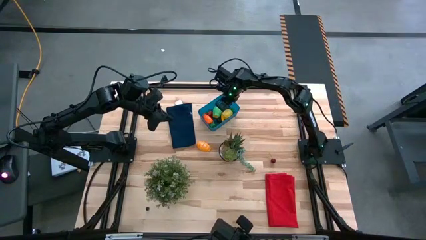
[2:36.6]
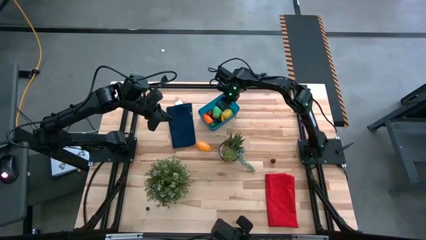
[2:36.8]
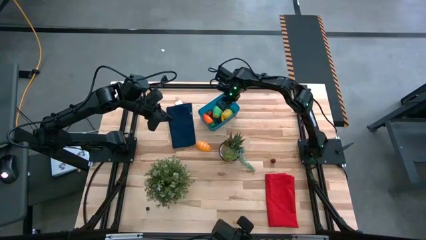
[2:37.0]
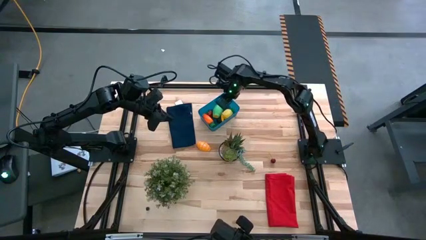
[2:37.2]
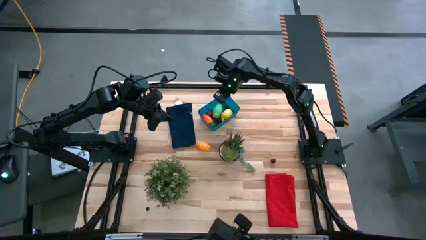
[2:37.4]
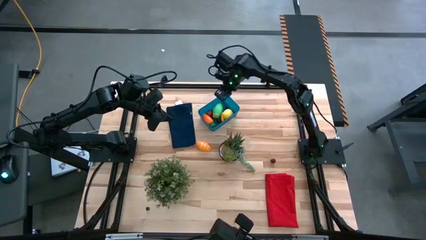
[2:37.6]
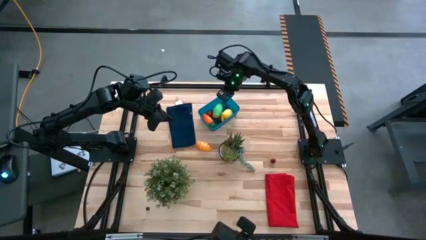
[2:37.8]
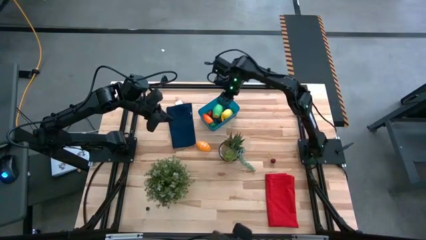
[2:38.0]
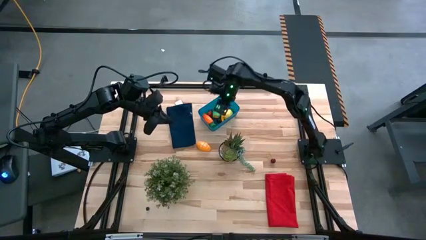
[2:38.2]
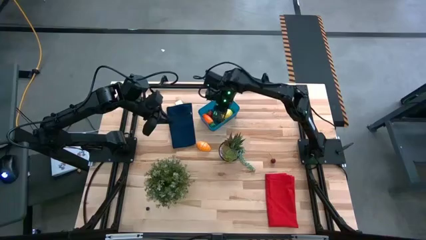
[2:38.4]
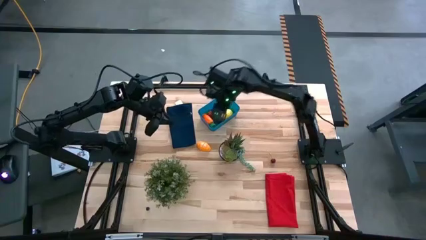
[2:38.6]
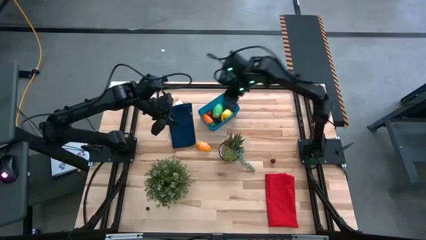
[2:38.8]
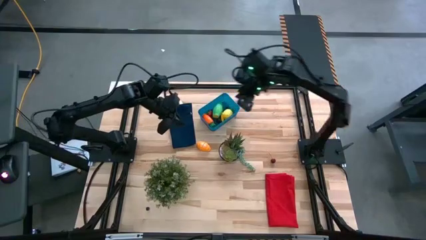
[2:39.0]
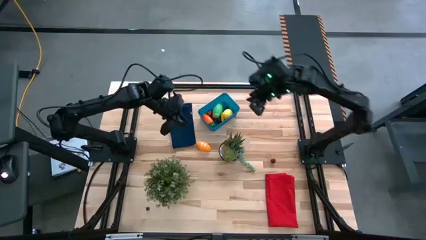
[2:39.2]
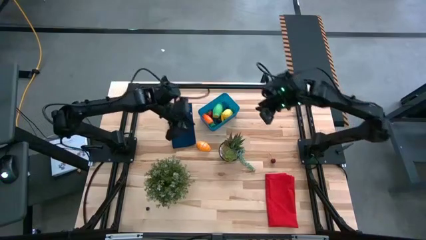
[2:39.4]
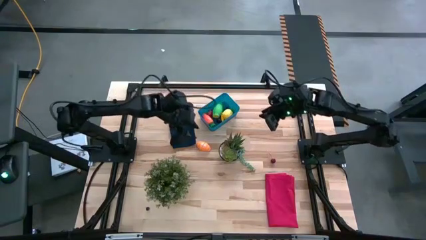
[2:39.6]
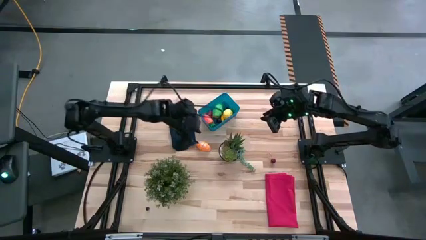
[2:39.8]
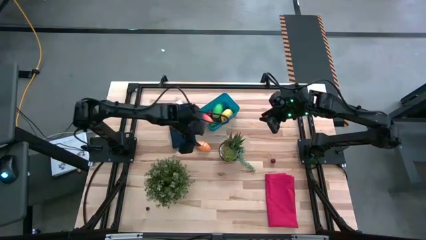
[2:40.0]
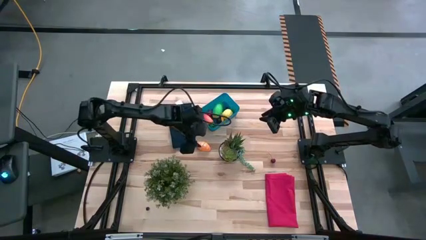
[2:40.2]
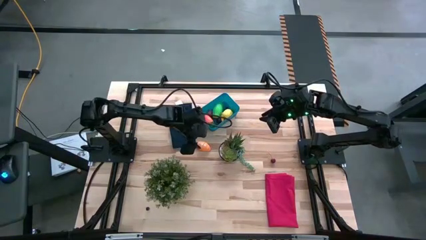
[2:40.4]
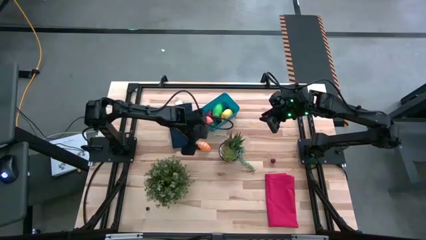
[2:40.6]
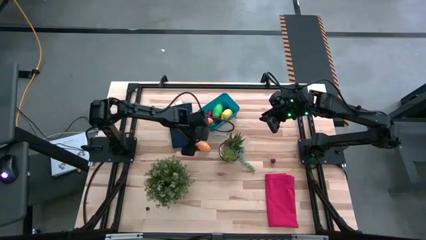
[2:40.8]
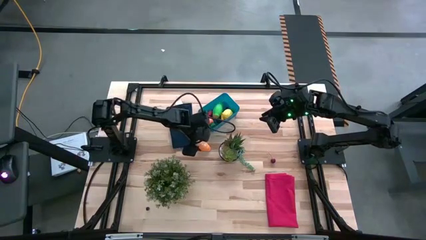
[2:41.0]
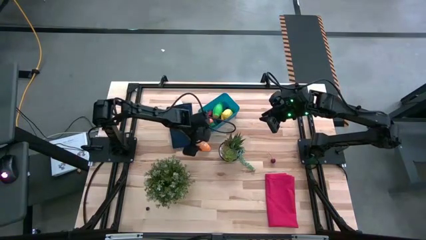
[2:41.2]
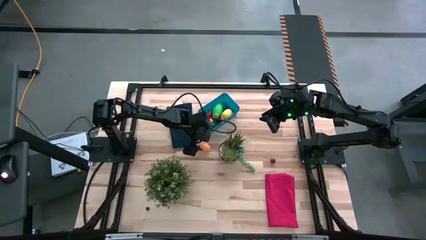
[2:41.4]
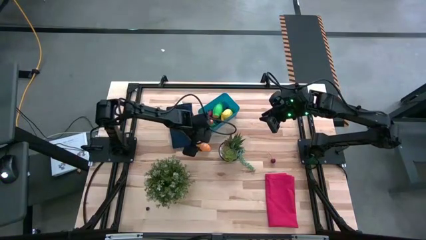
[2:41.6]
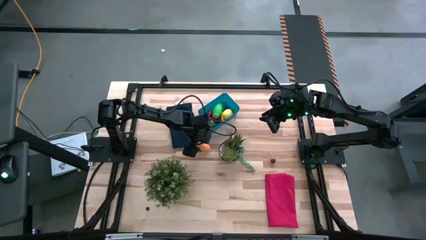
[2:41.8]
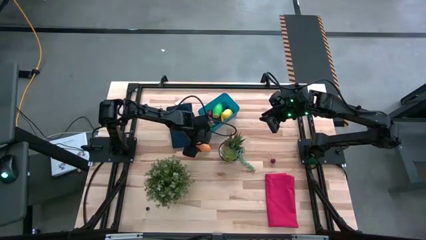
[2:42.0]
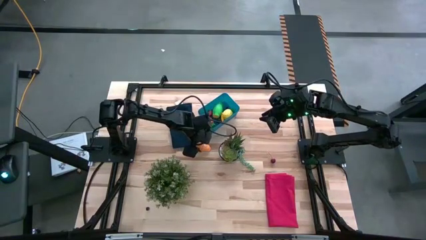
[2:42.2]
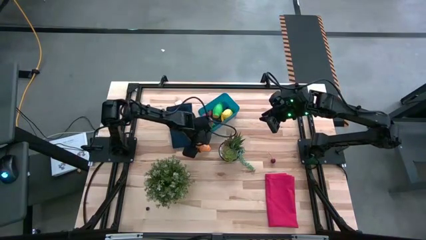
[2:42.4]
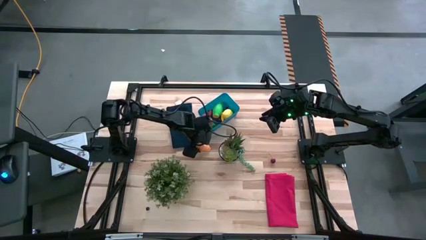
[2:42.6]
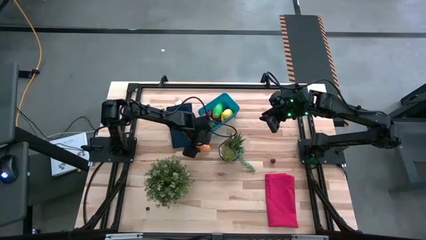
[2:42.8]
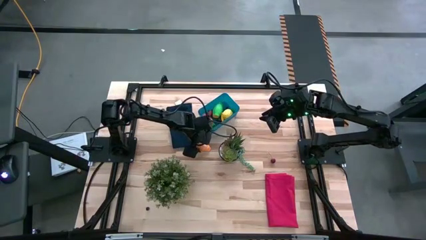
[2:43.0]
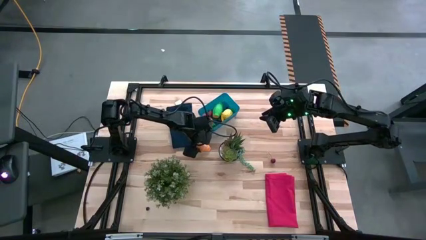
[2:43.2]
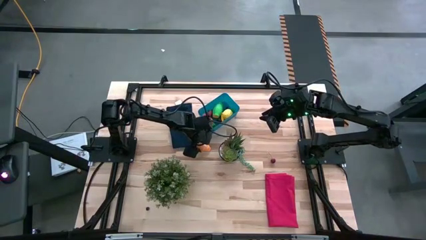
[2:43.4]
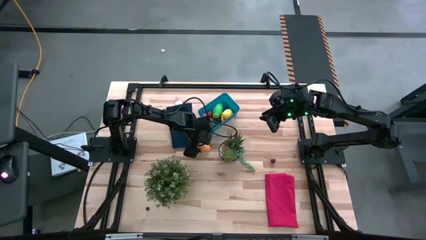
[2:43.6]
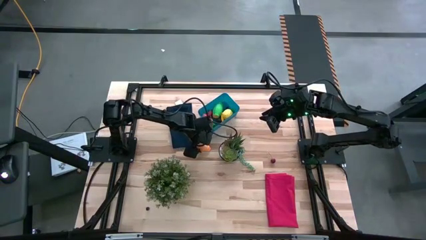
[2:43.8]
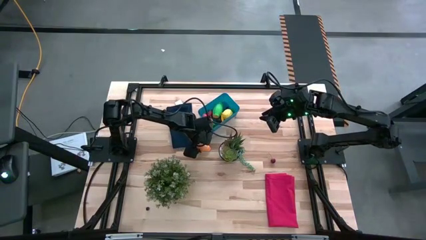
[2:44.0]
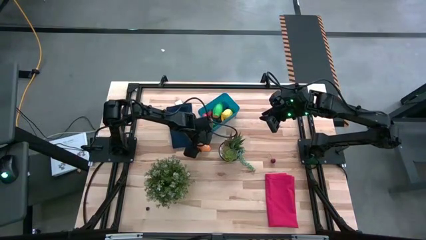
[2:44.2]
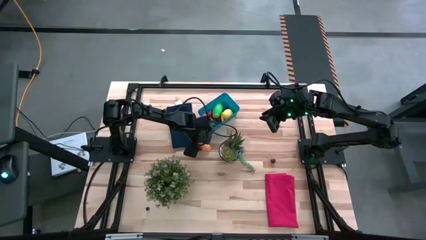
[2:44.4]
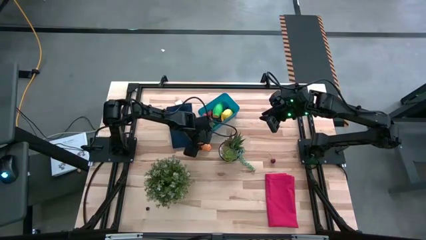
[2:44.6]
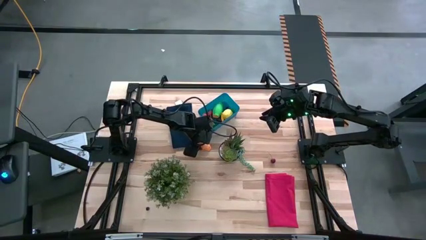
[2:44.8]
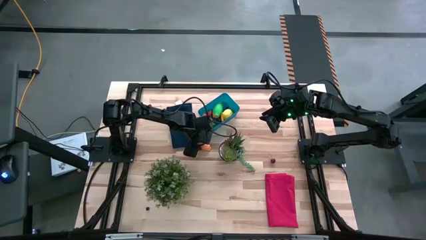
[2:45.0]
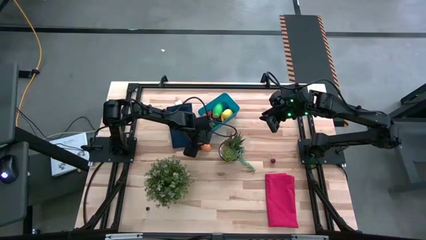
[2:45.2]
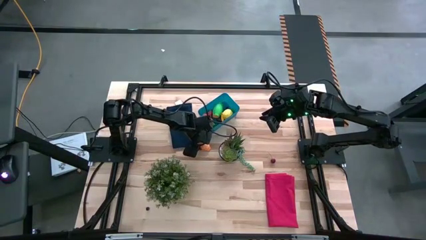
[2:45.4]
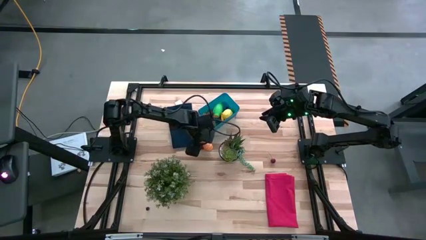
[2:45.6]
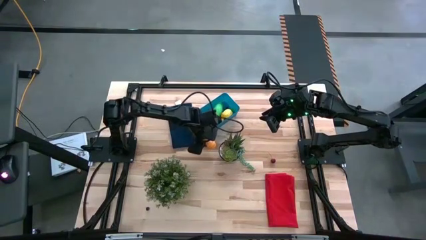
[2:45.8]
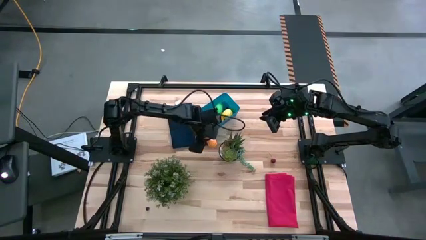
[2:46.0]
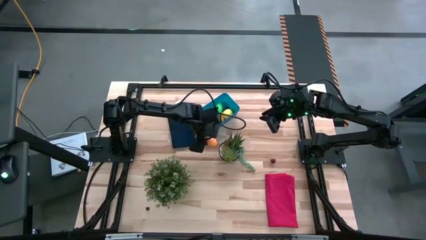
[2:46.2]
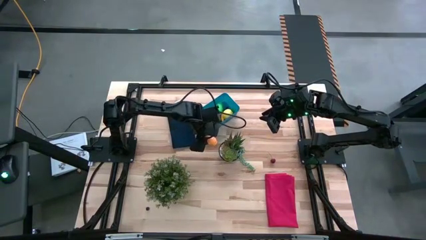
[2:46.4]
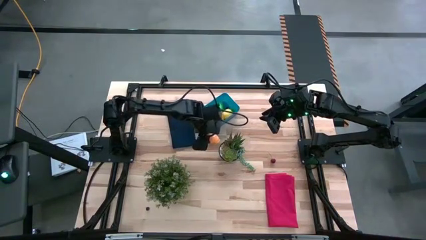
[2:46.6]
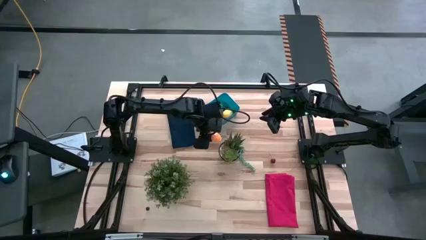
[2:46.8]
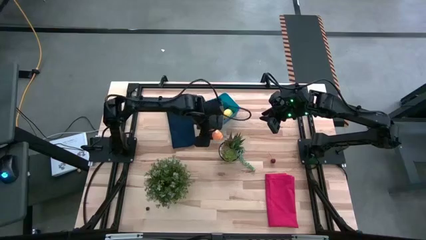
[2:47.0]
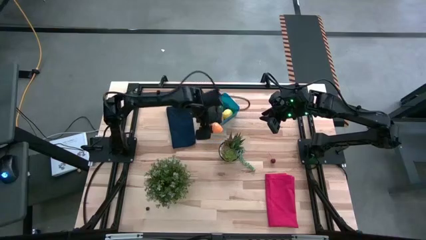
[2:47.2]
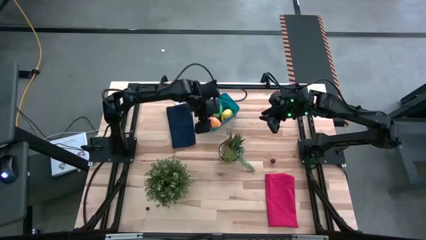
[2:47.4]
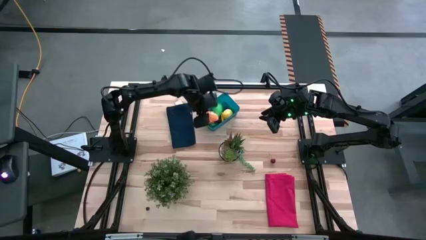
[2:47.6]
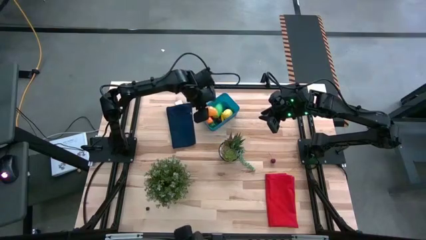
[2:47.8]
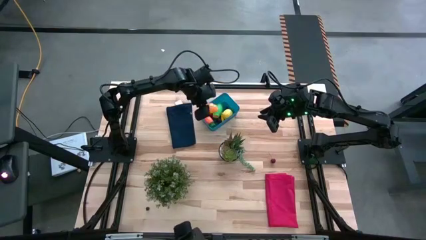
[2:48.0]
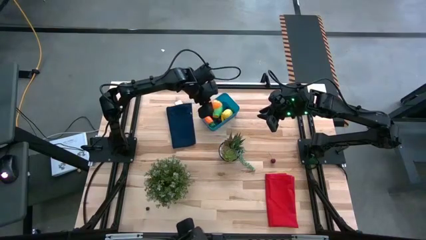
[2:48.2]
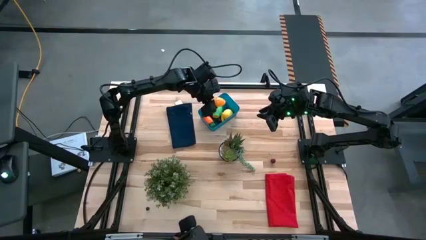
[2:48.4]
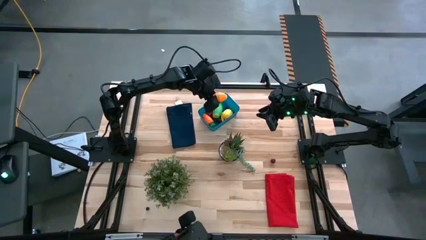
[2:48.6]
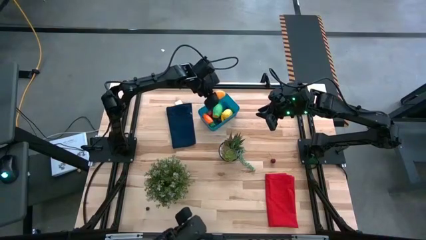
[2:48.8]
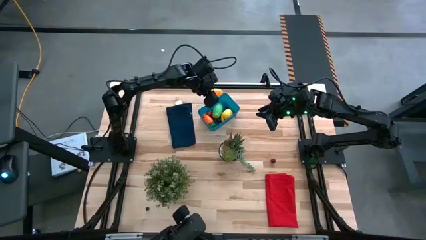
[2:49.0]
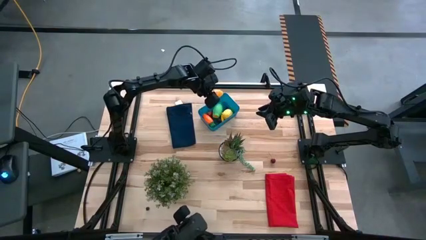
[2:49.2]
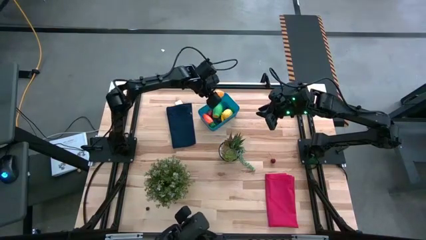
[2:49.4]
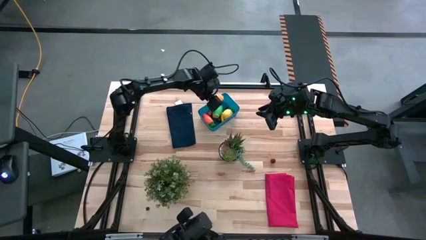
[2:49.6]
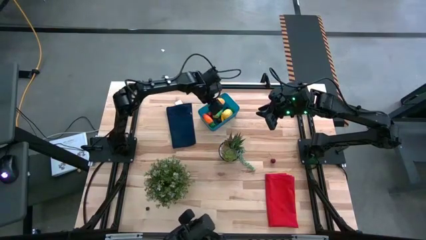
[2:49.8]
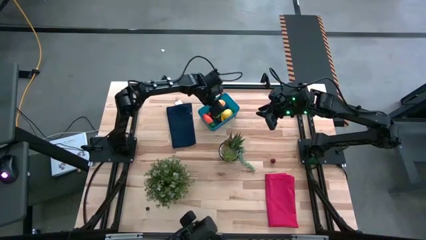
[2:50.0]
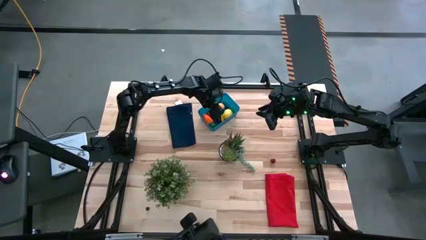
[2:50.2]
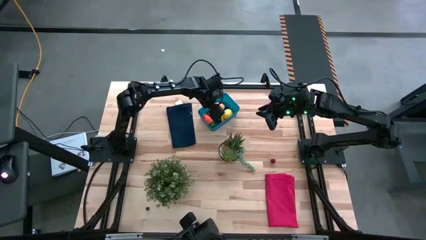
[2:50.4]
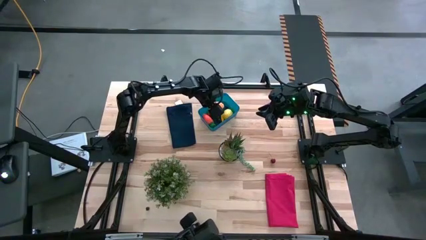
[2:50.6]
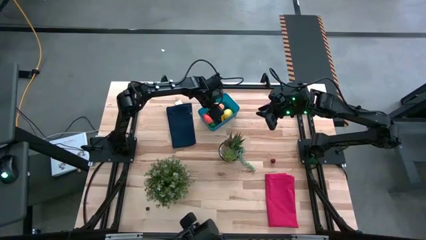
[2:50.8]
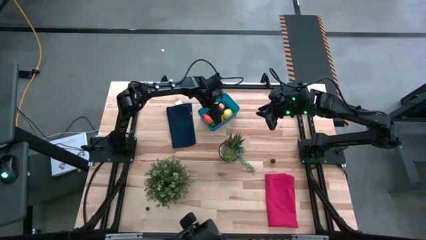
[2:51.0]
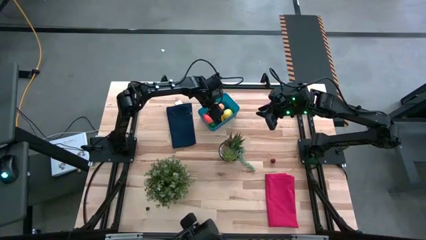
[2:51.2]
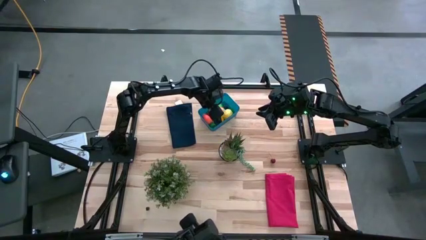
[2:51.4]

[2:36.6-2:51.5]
Task: Pick and placing Produce into tupperware
Put the orange croissant into the blue bin
